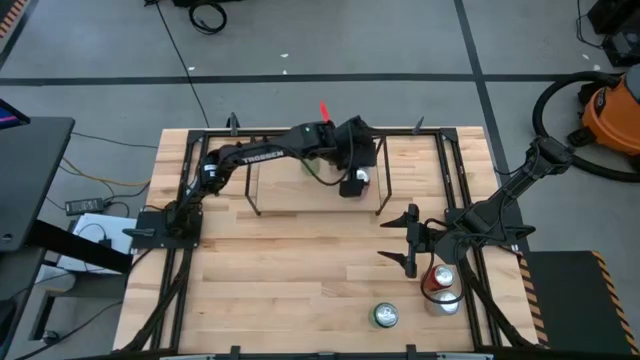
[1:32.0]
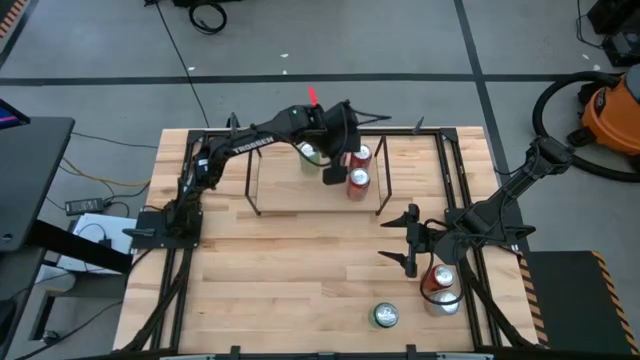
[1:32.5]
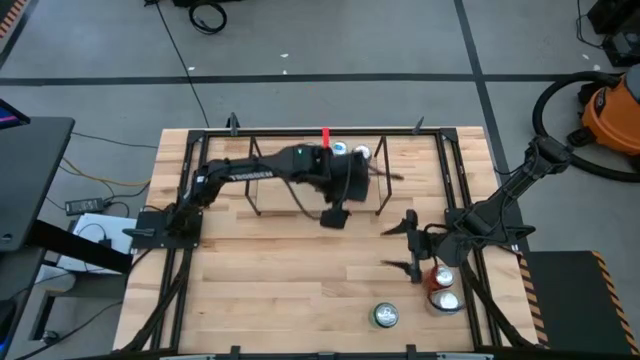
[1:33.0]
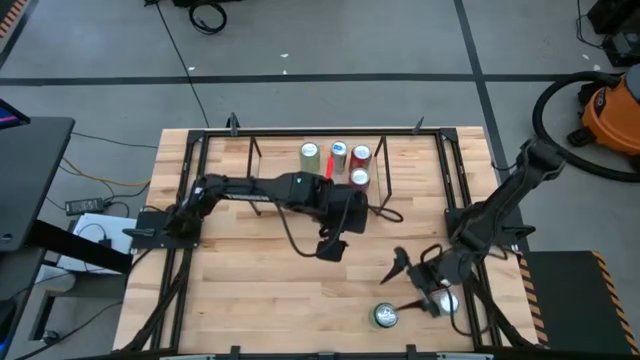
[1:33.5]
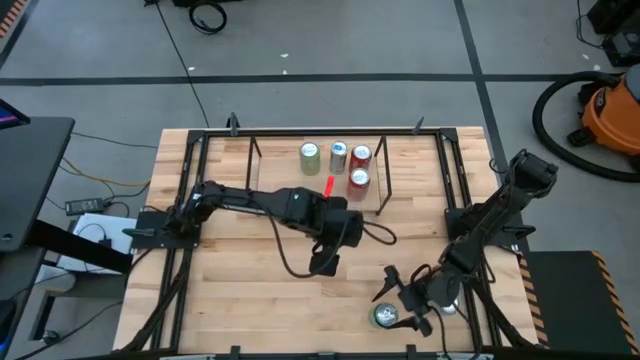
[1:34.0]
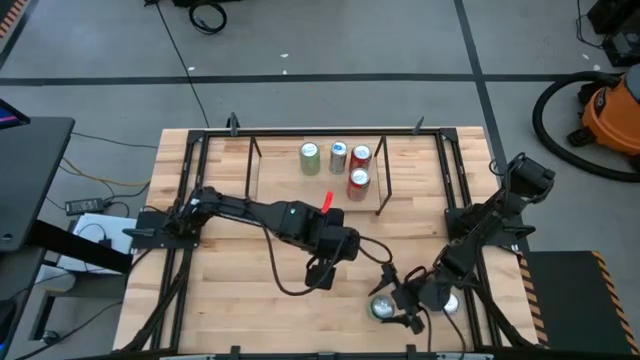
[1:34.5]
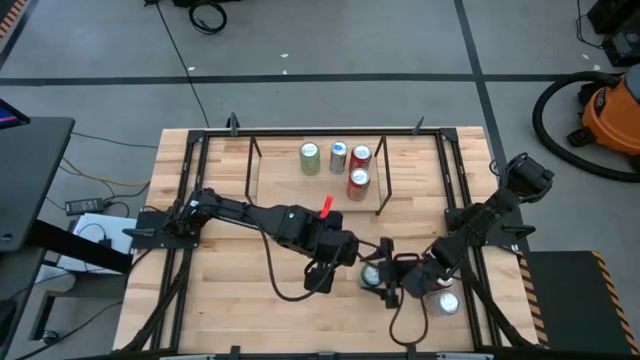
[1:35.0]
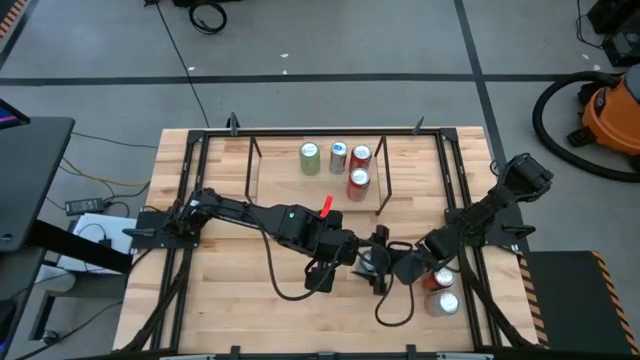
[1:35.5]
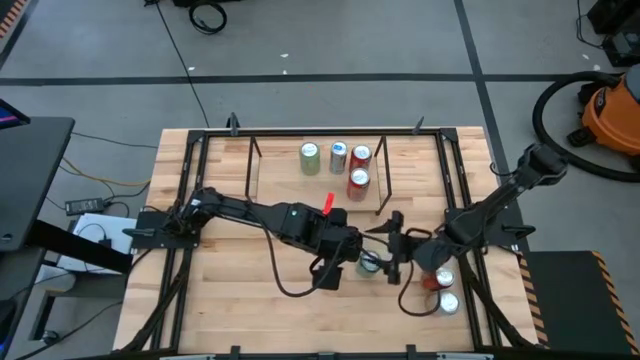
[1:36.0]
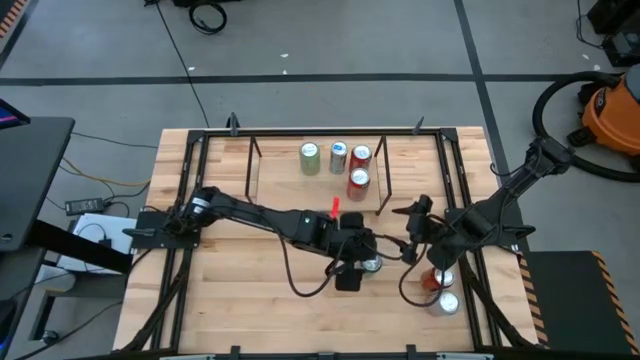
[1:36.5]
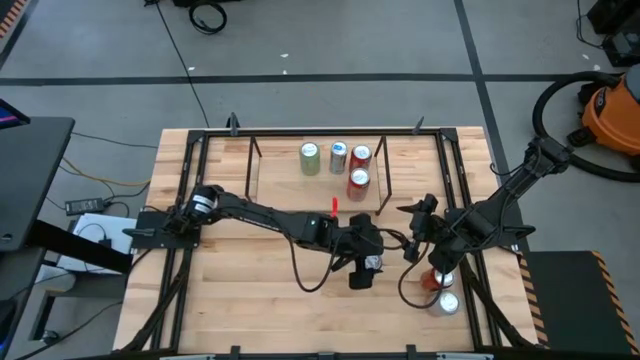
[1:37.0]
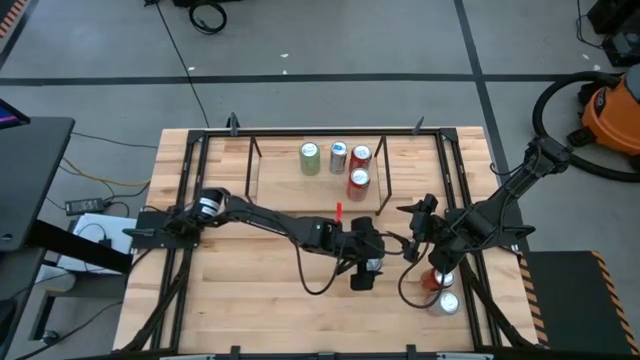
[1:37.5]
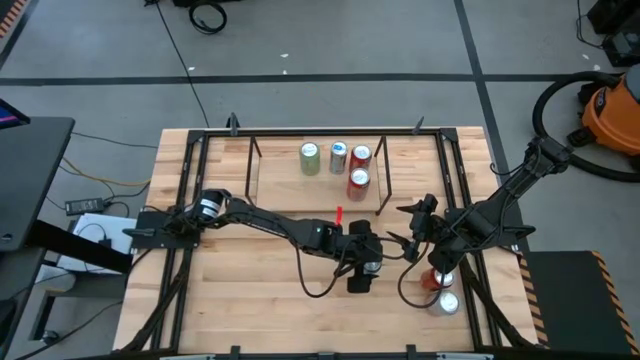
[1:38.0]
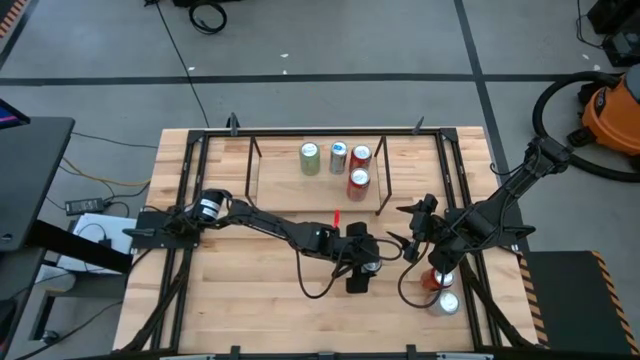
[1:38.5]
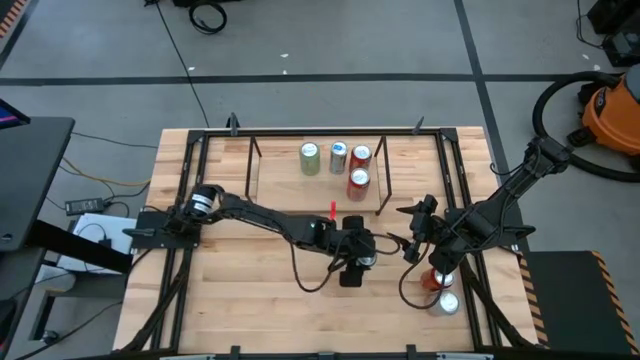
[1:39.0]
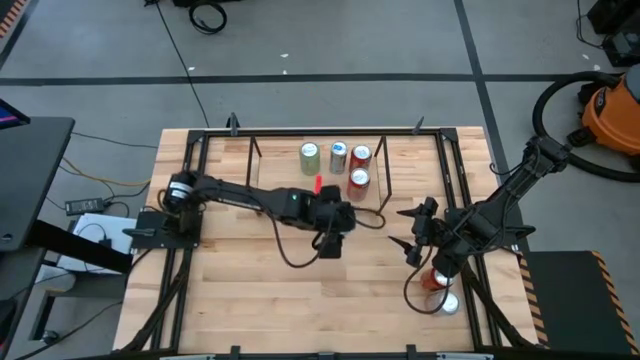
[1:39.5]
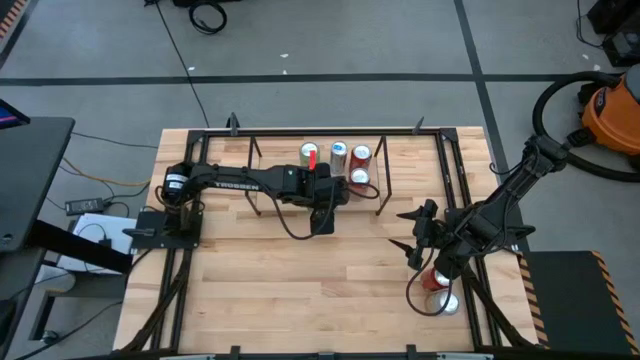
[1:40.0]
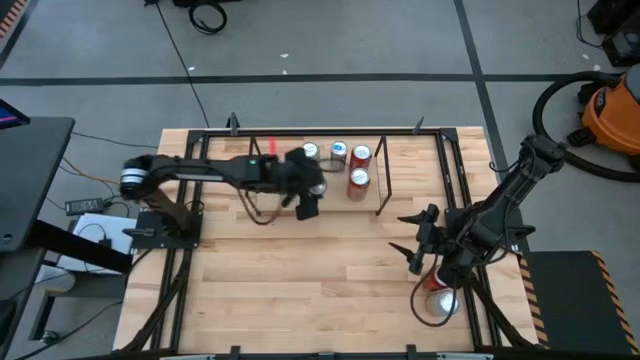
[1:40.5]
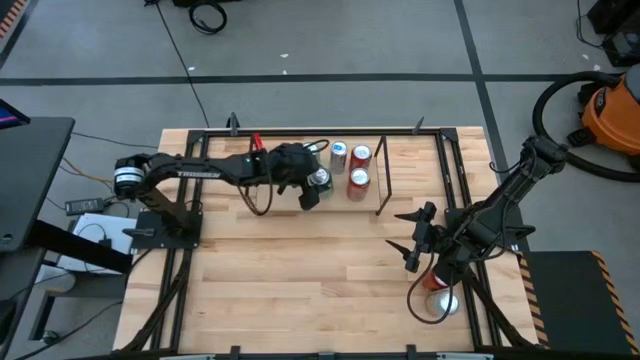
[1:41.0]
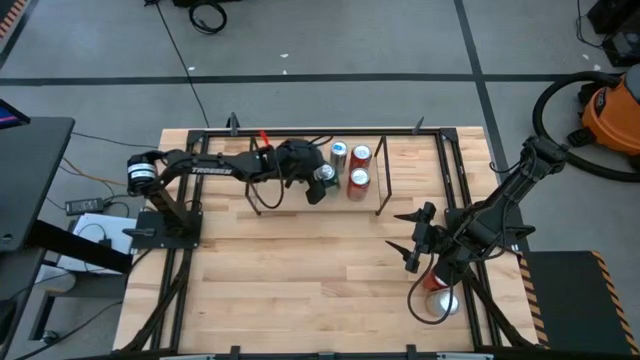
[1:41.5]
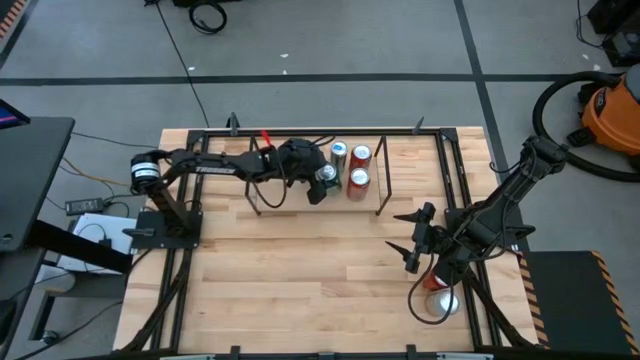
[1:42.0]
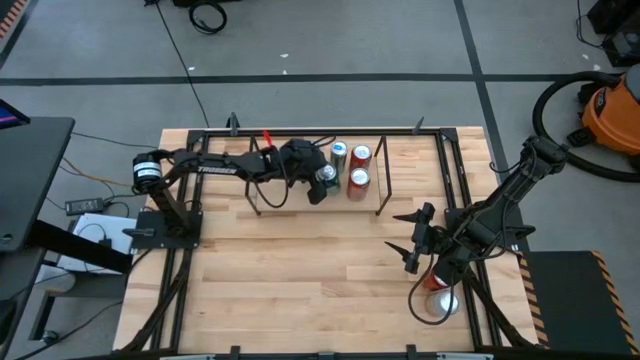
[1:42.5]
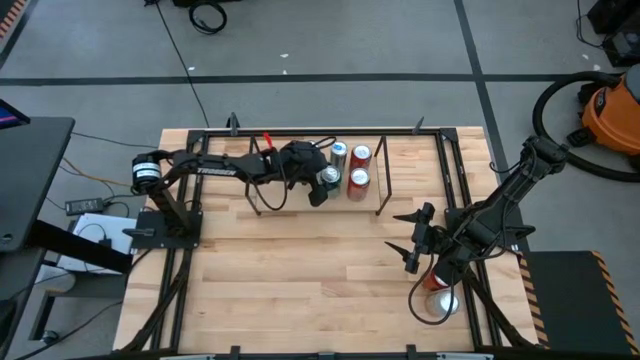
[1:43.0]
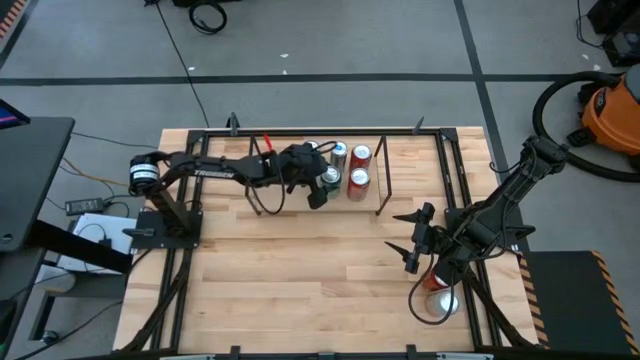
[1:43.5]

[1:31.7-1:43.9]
Task: Place canned beverage on shelf
Put the green soda can on the shelf
